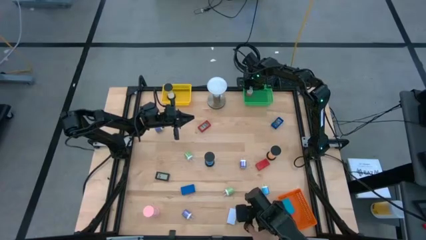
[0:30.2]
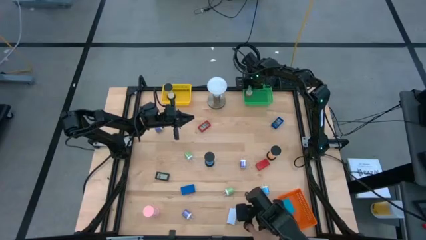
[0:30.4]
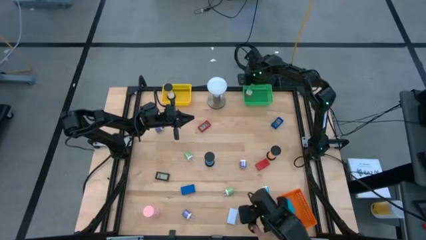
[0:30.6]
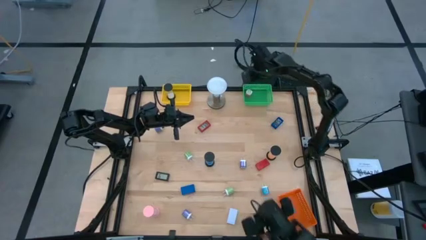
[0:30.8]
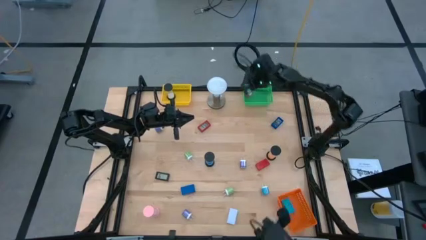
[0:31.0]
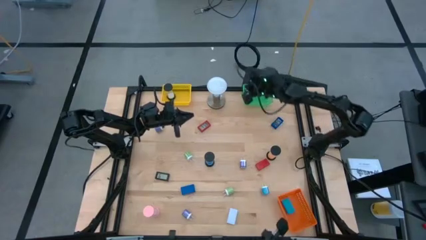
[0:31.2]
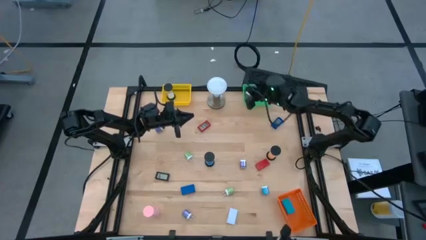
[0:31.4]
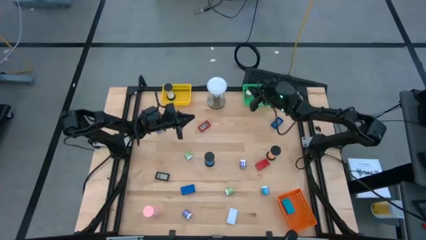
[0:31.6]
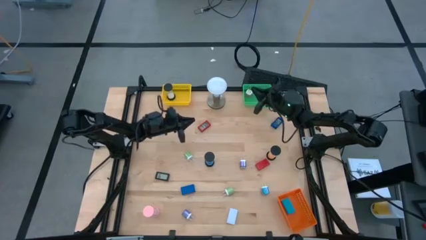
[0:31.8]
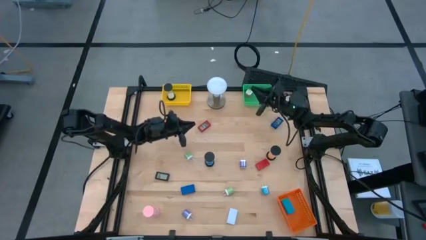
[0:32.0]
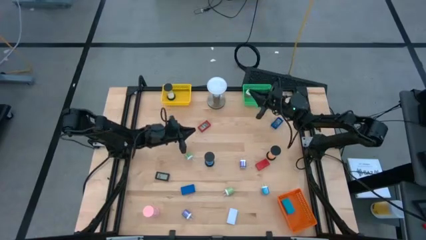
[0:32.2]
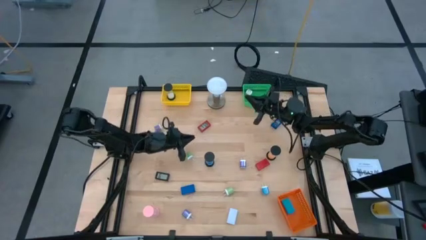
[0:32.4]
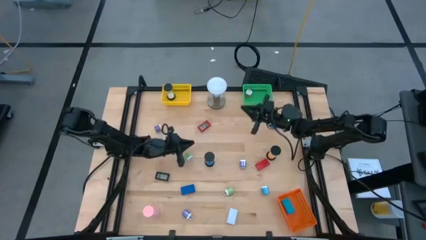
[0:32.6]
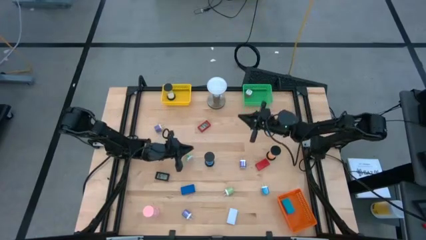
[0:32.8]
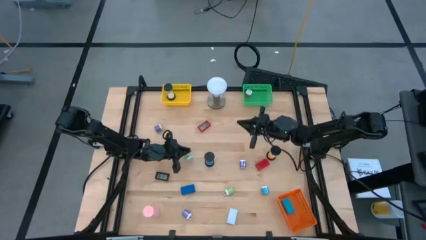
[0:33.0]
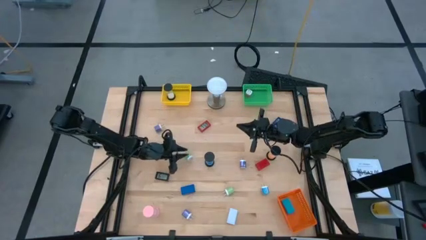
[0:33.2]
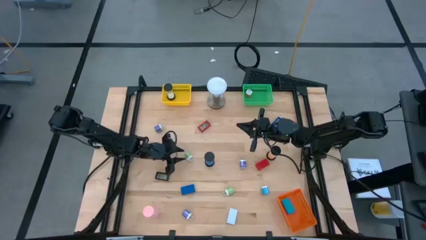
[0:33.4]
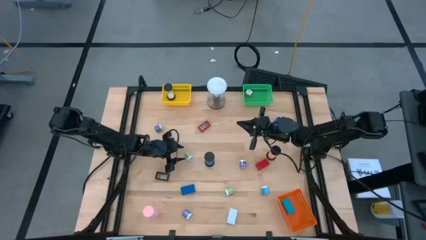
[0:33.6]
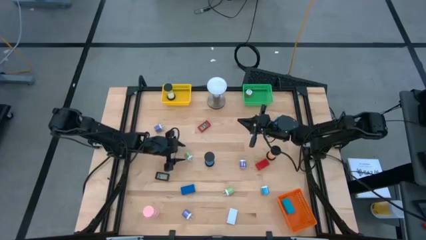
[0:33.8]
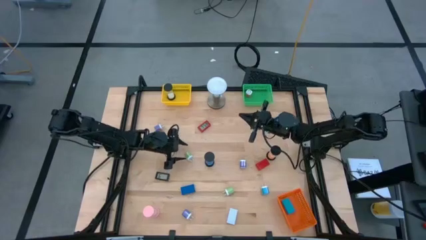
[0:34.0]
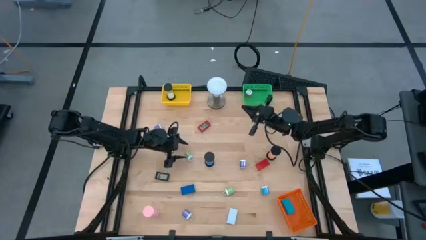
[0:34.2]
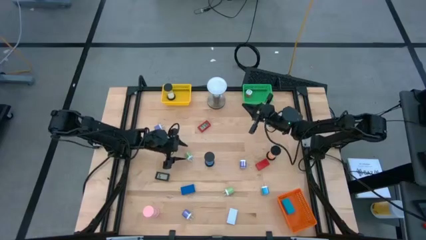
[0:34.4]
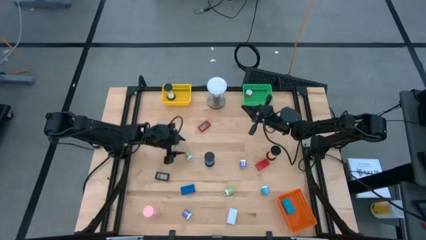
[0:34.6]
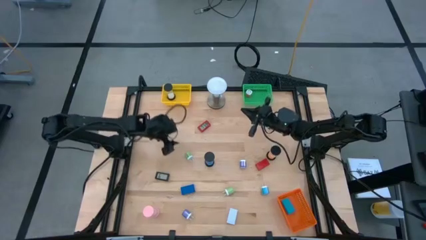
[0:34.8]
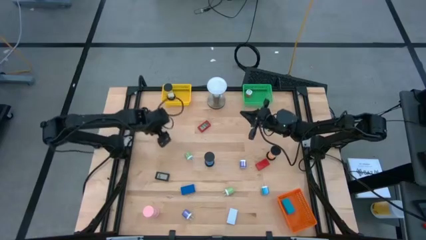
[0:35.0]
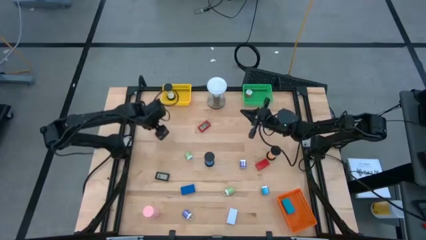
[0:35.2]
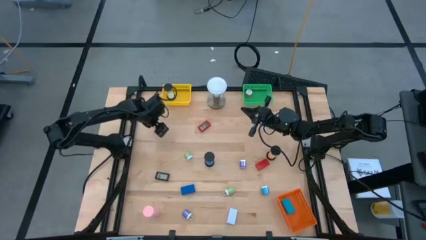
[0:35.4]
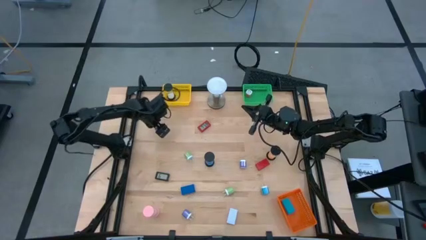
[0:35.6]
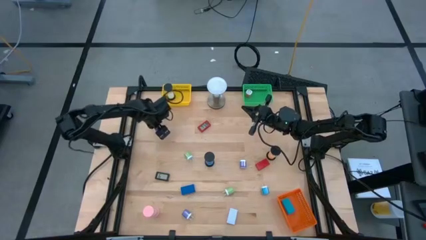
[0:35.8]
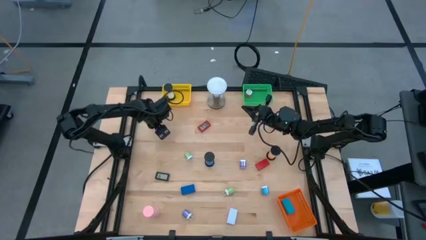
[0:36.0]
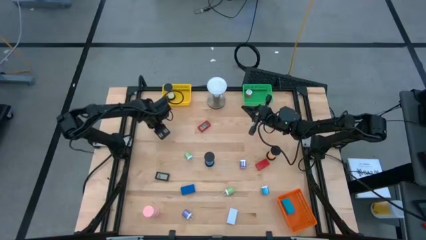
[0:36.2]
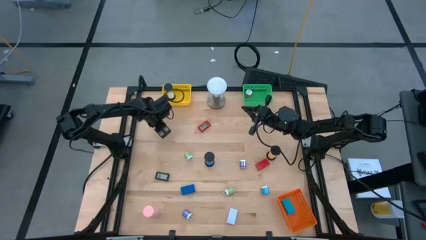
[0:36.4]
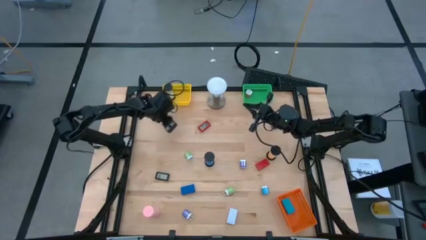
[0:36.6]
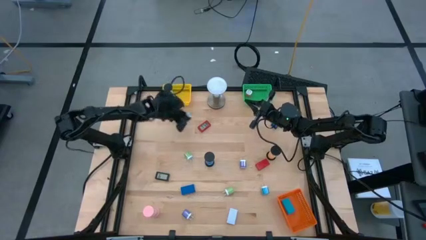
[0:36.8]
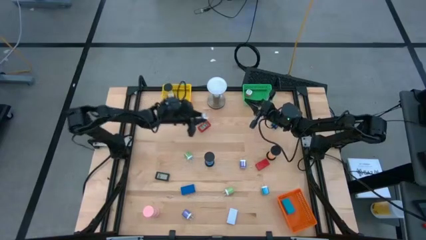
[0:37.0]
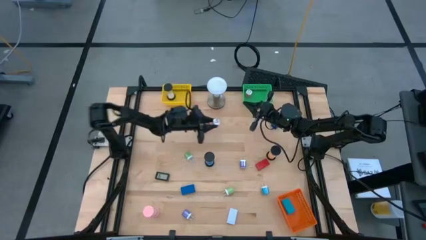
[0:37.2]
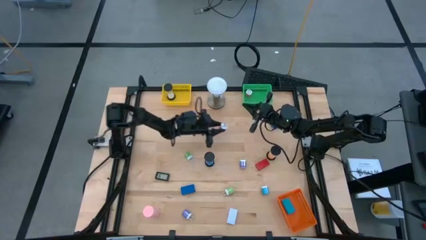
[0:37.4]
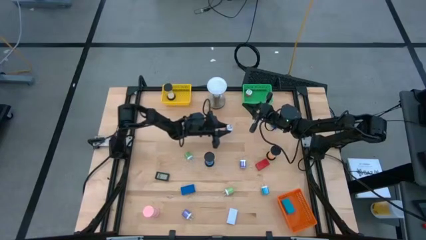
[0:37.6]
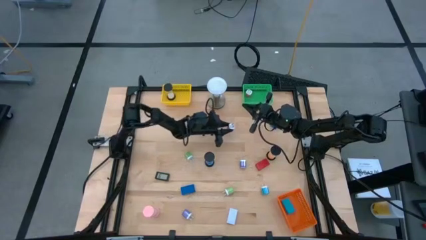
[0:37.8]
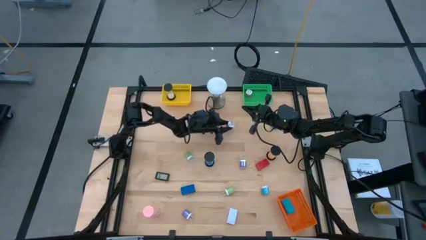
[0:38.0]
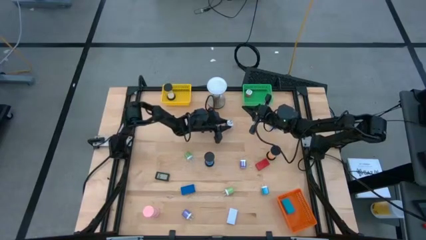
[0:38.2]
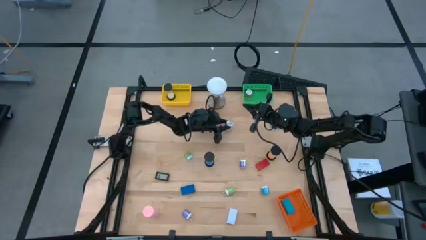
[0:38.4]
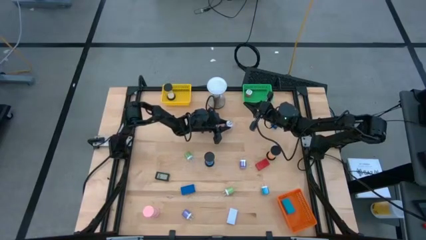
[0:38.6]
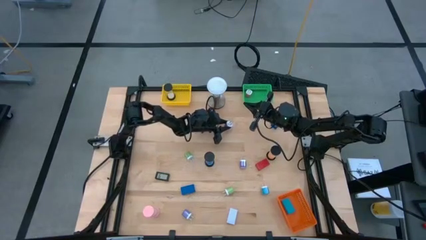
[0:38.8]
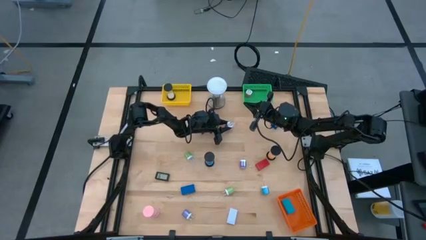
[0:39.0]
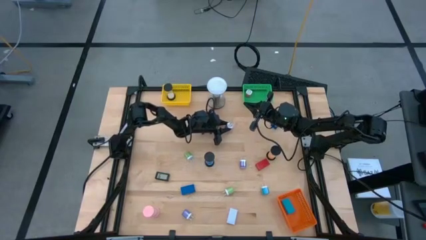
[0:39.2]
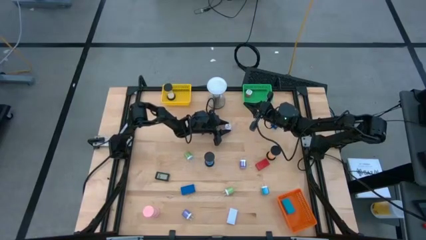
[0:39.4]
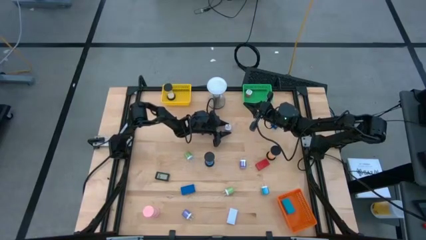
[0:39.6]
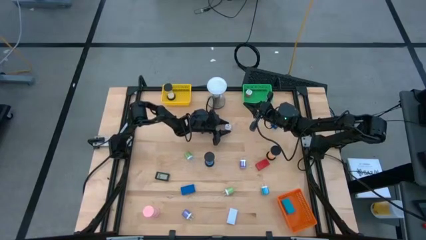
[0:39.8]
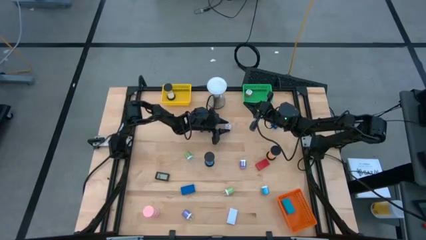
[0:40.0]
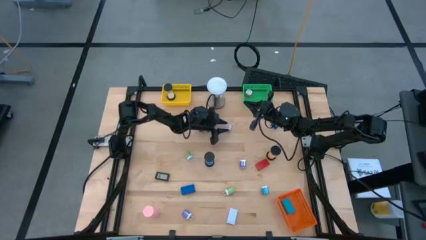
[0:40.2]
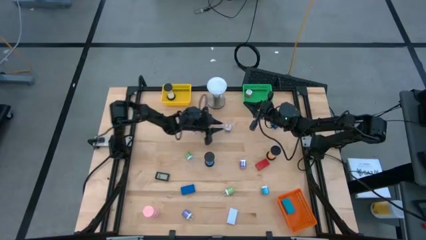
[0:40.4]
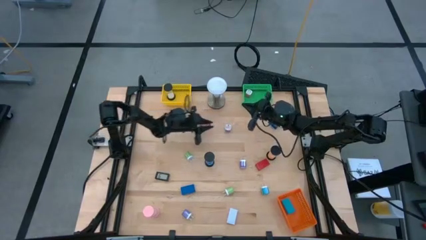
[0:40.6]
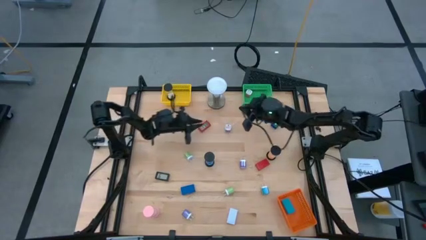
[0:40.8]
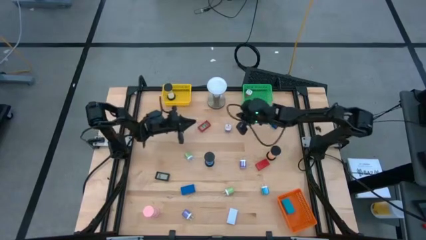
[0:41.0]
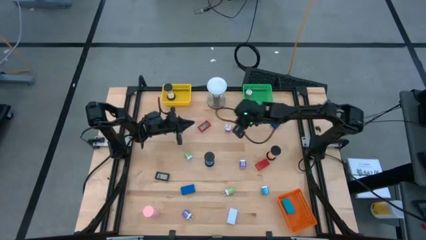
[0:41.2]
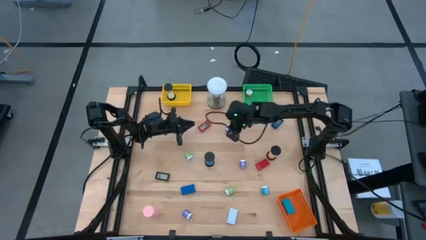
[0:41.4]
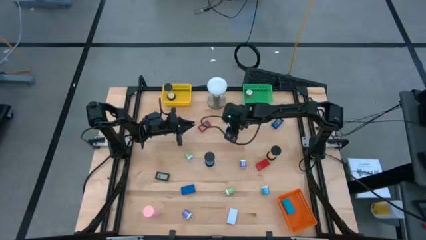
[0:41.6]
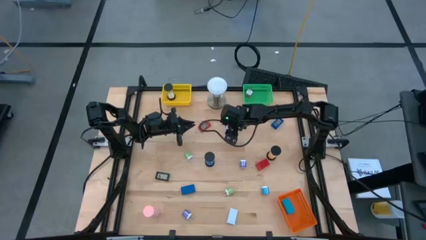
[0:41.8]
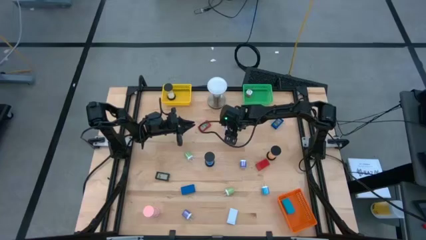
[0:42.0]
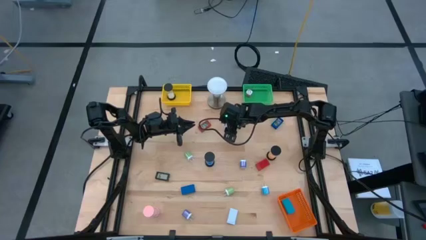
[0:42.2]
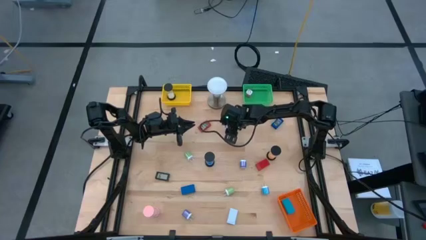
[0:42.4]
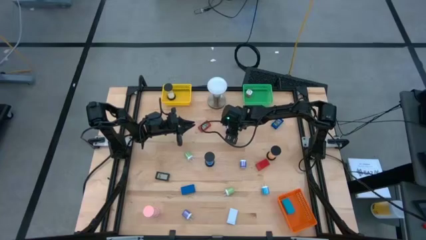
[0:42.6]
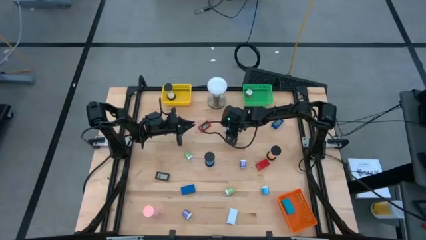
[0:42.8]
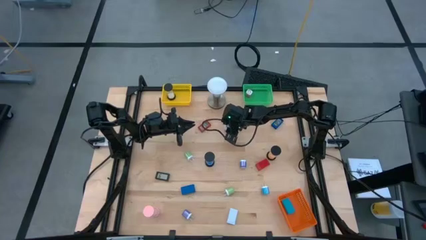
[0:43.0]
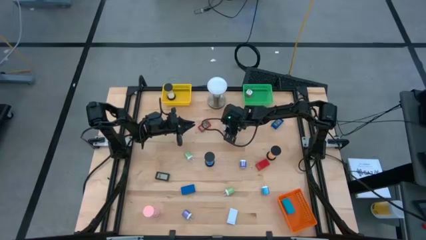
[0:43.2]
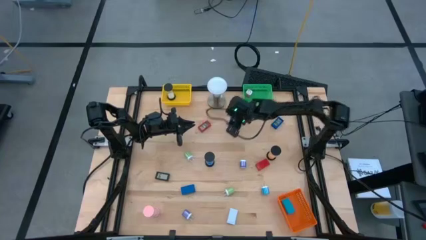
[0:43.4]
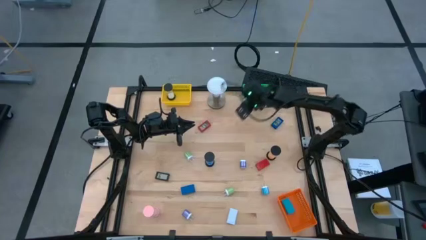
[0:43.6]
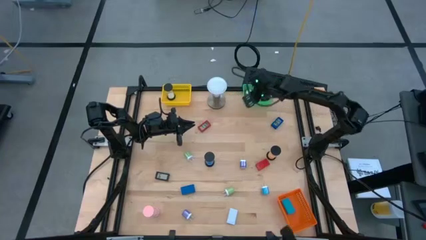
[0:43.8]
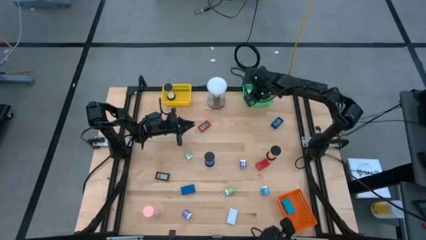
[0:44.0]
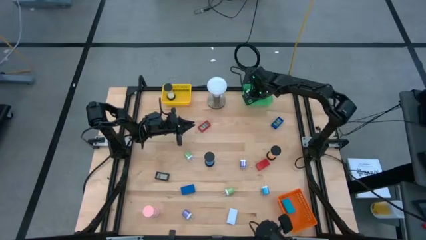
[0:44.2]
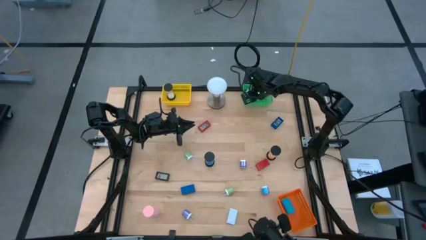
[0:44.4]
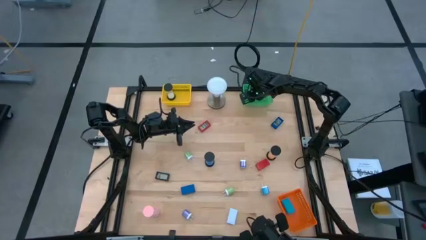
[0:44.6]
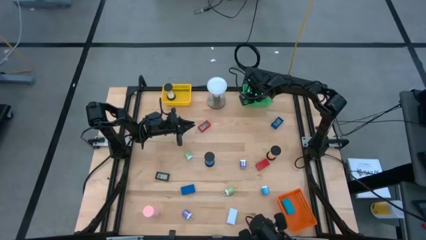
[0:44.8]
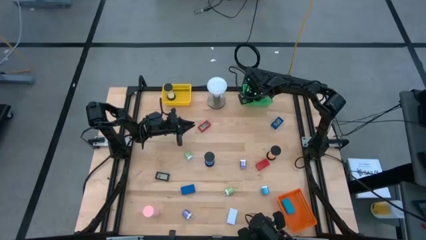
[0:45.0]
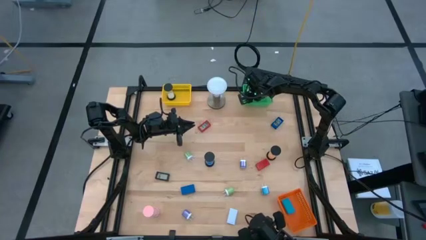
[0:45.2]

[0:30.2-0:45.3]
Task: Pick & Place Office items
Put the top purple charger adapter into the green bin
